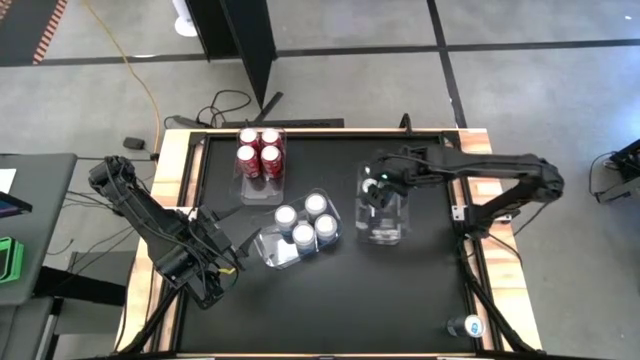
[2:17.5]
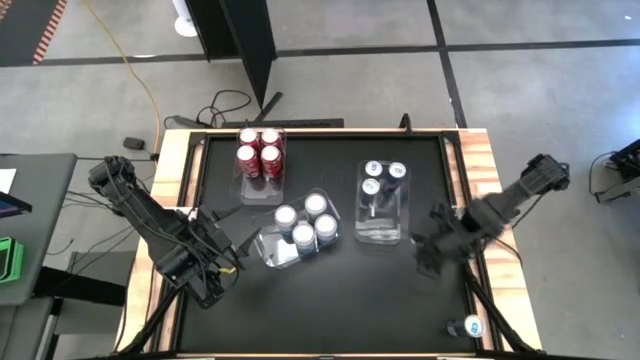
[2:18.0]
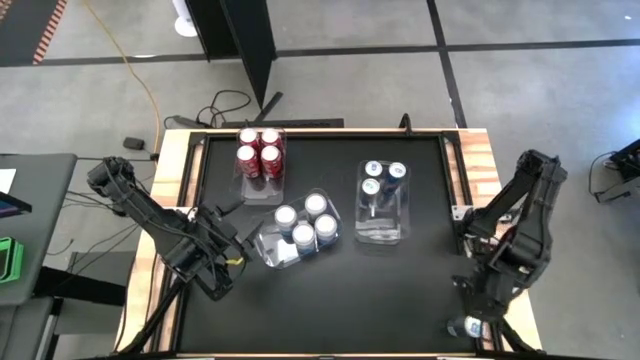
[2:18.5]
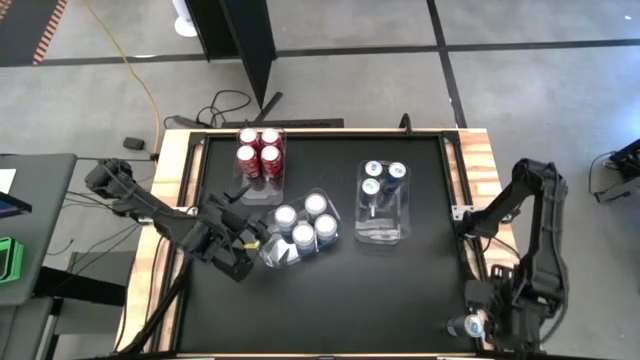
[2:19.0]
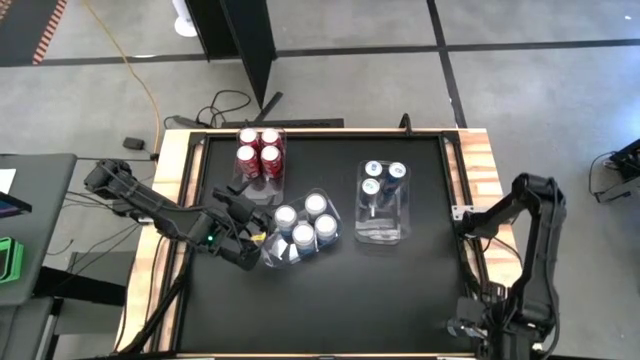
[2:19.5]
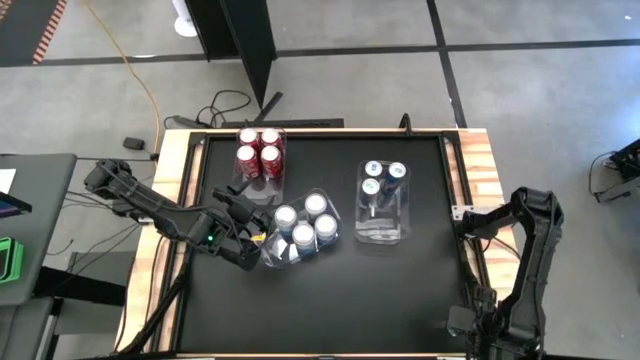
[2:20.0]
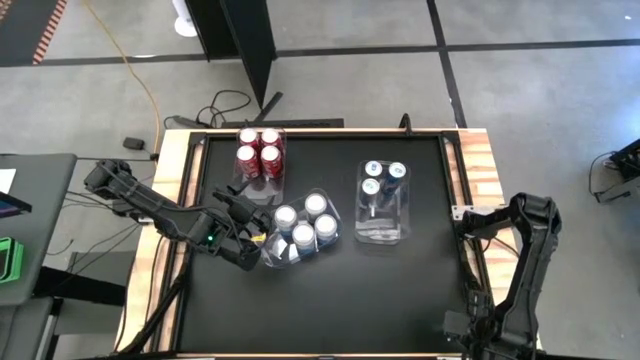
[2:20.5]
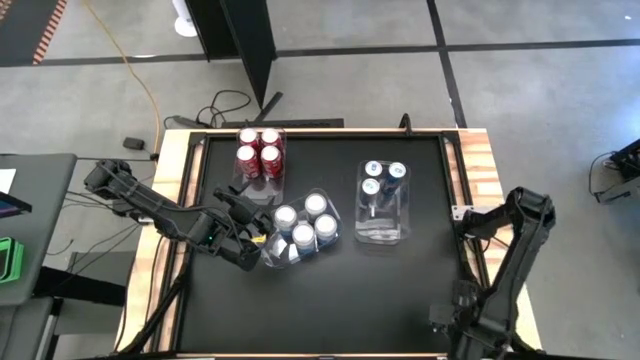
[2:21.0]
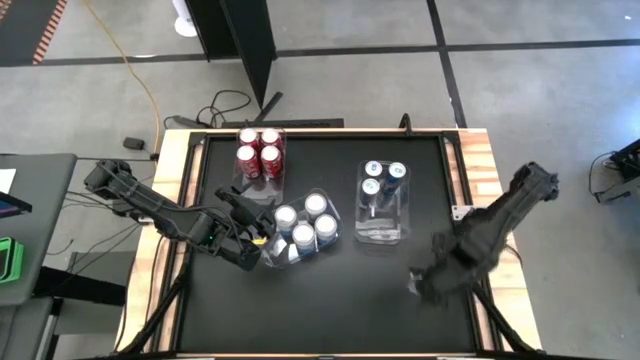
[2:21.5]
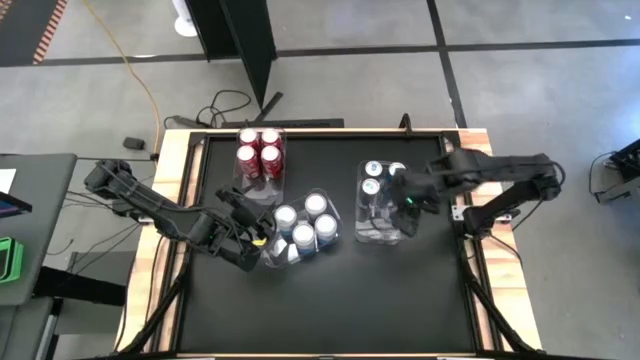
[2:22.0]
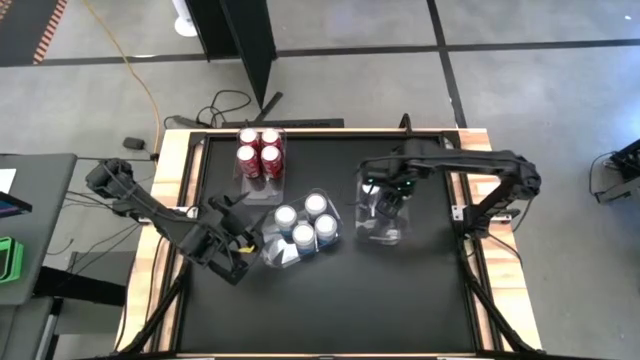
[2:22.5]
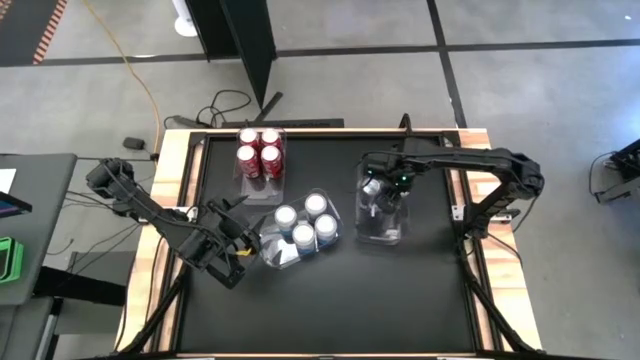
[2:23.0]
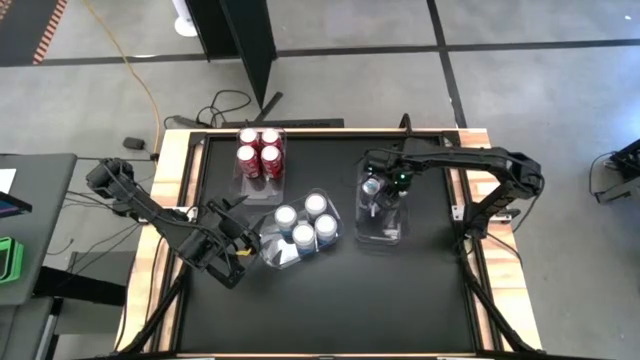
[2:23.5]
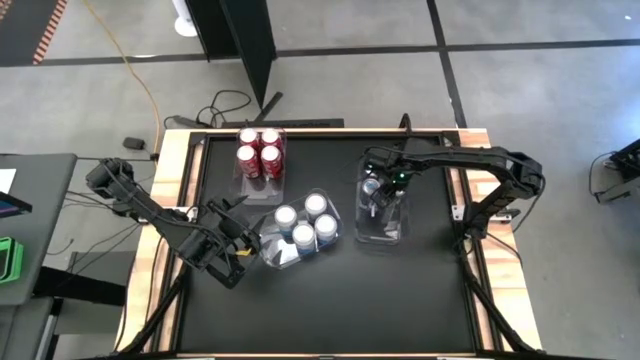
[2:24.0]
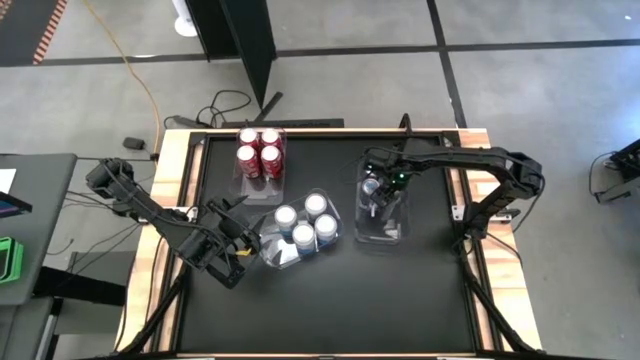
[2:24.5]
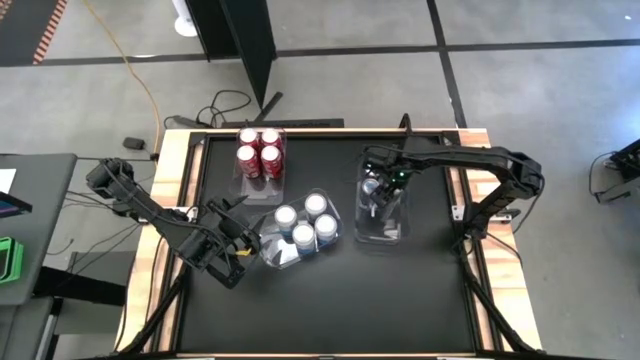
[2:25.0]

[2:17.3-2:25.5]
Task: Sort soda cans
Put the blue soda can into the right transparent bin

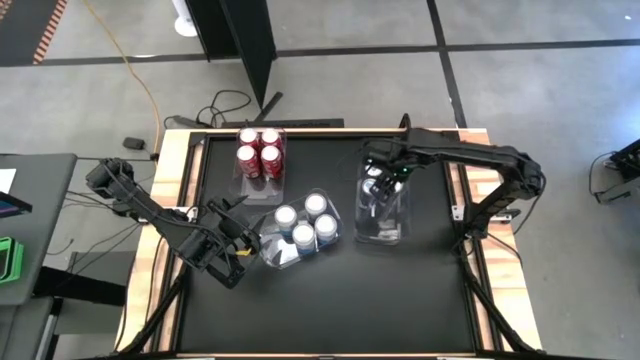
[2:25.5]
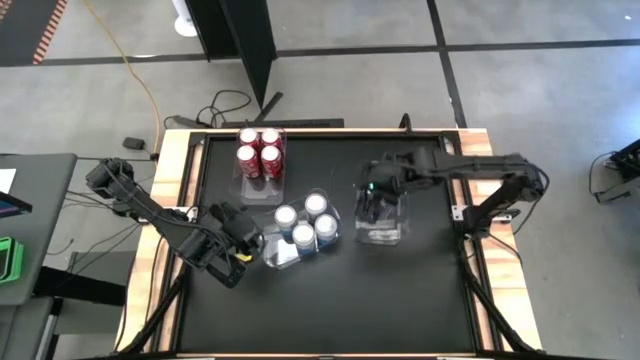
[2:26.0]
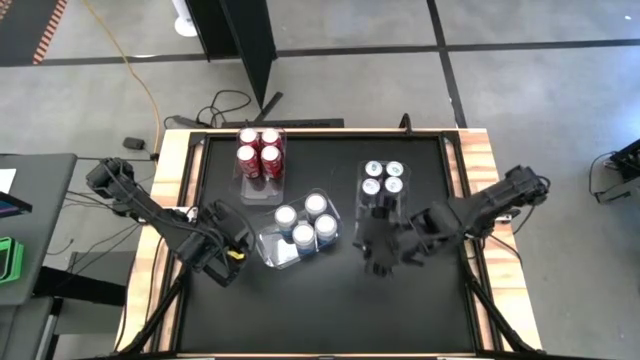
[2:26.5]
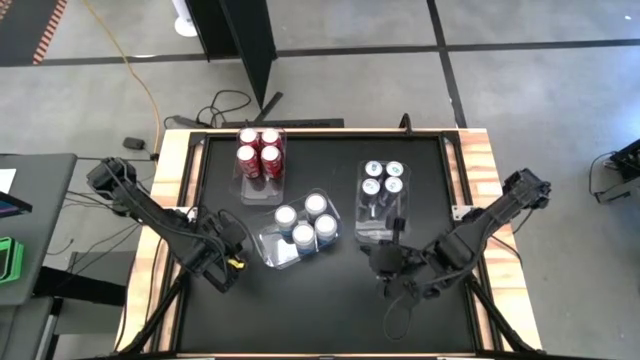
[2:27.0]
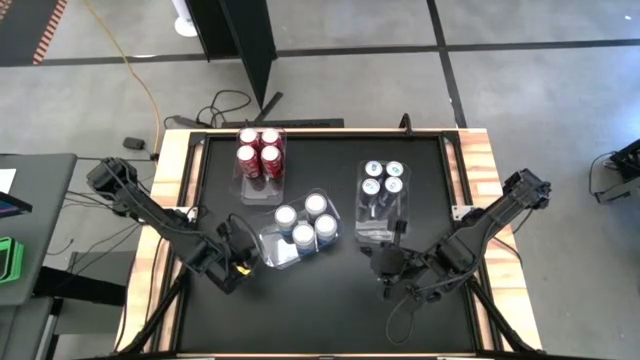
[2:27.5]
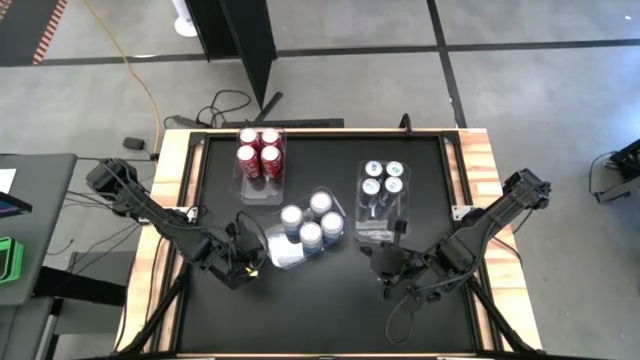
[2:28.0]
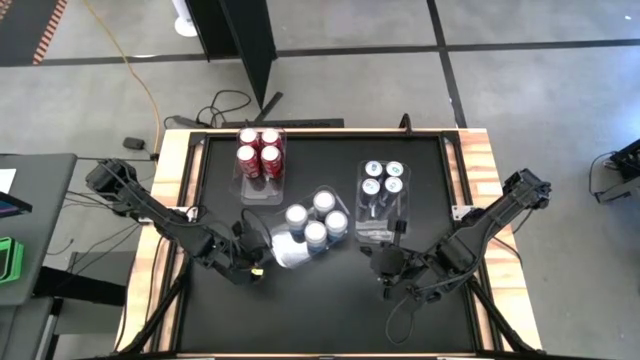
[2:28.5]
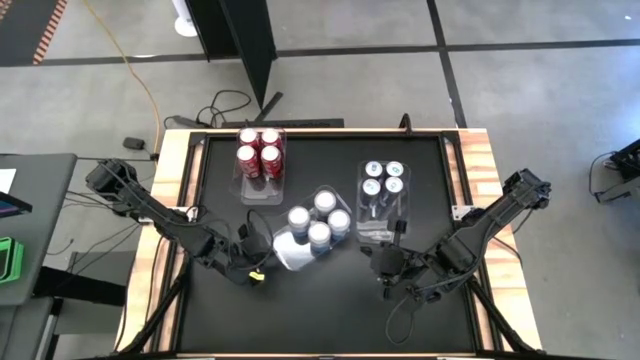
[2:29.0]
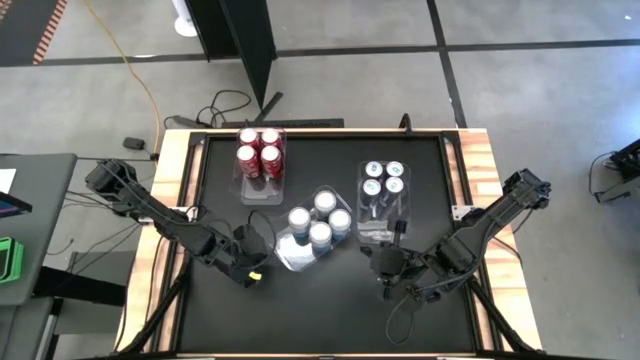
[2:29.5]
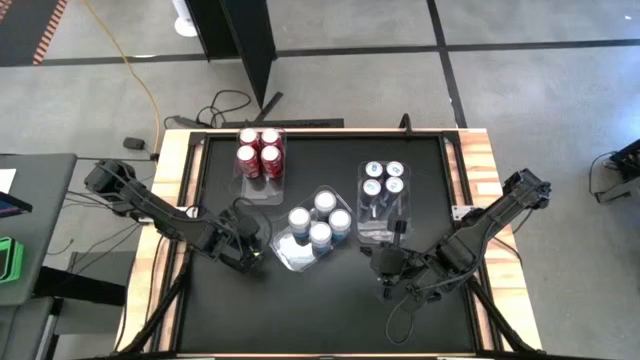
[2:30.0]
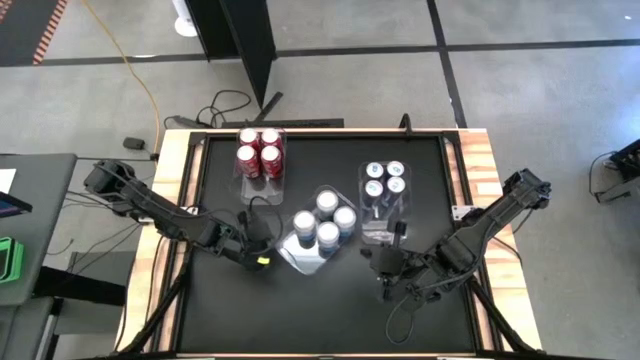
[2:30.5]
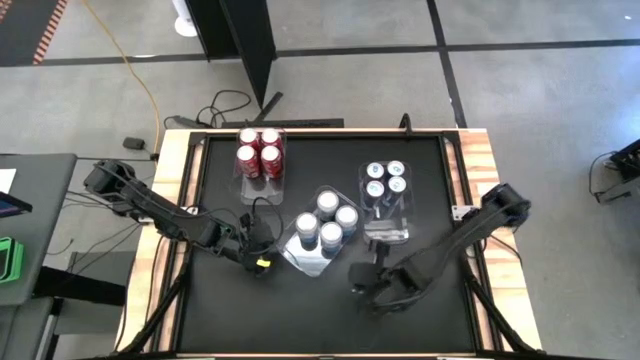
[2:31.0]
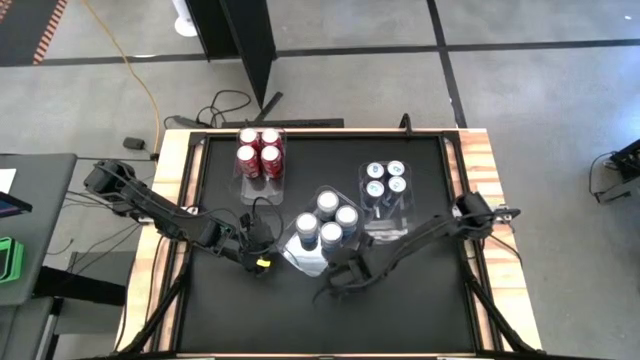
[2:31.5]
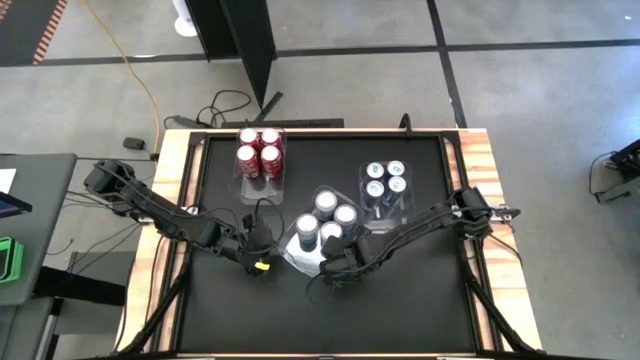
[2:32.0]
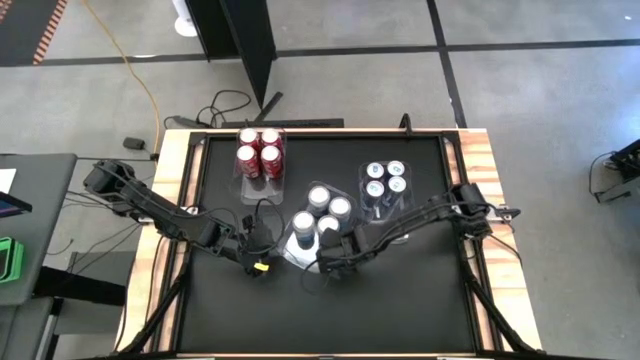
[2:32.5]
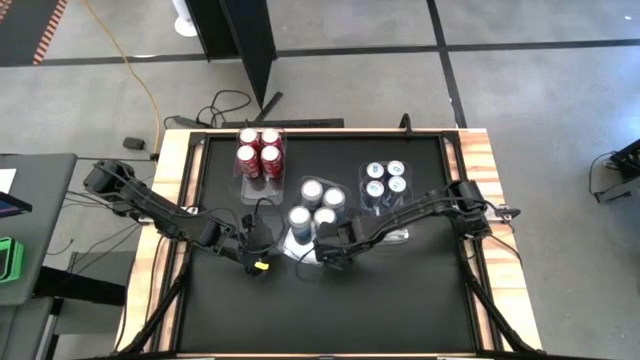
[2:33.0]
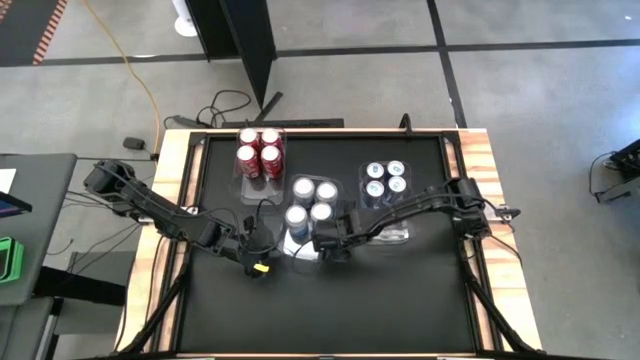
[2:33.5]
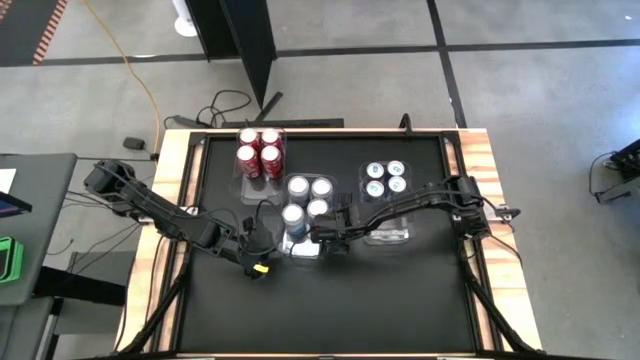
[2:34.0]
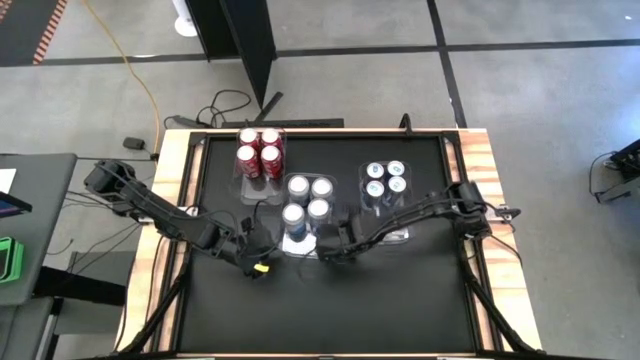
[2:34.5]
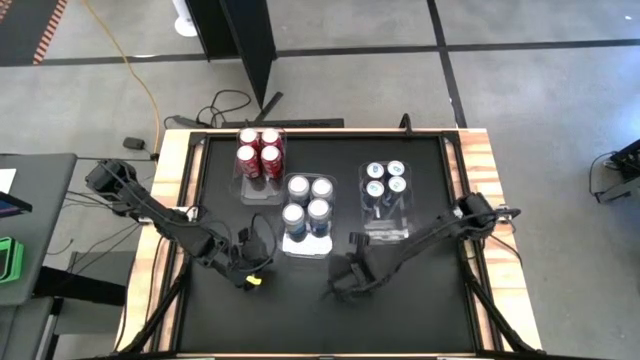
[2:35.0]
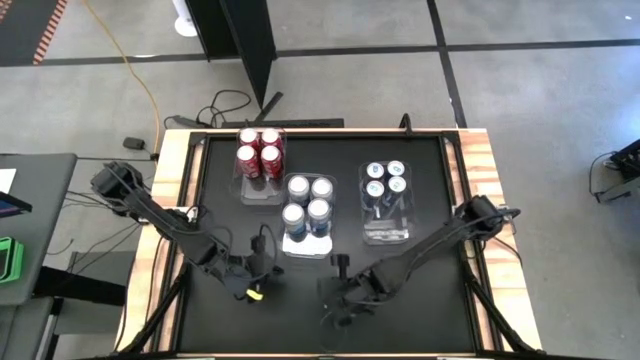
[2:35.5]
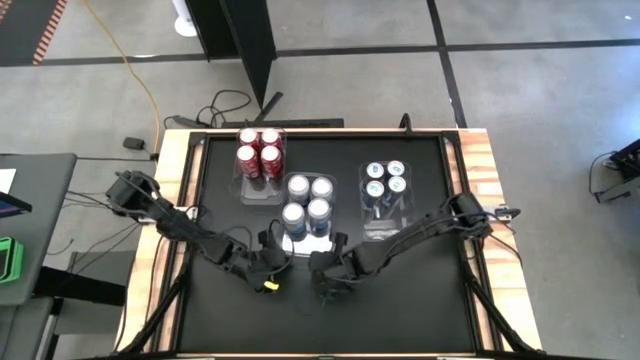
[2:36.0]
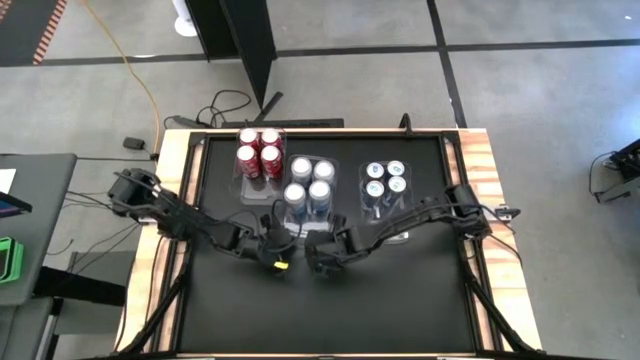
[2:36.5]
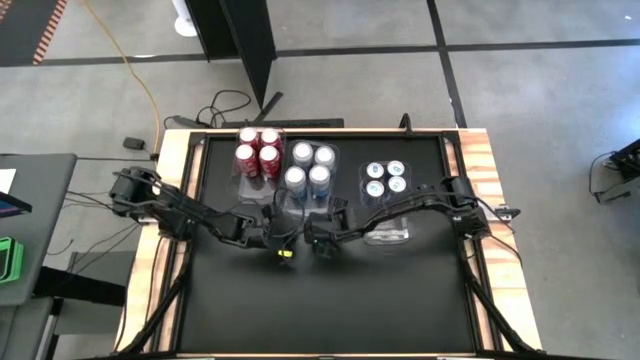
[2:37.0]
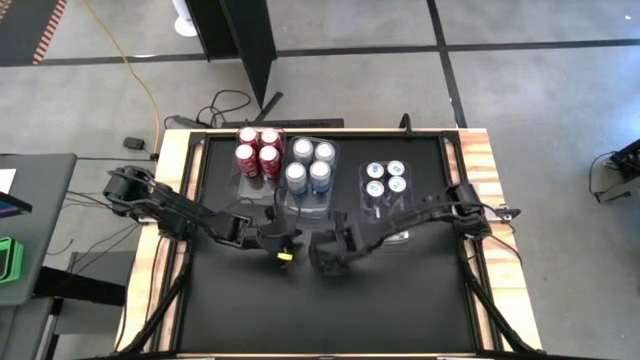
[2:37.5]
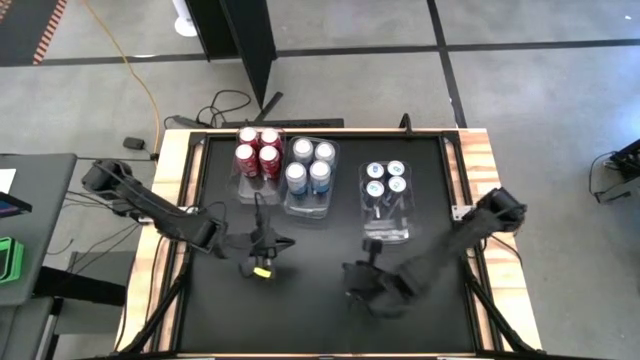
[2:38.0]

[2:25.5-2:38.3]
Adjust the transparent bins and align them together
